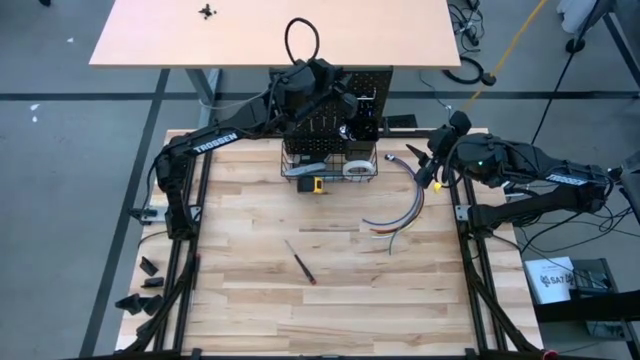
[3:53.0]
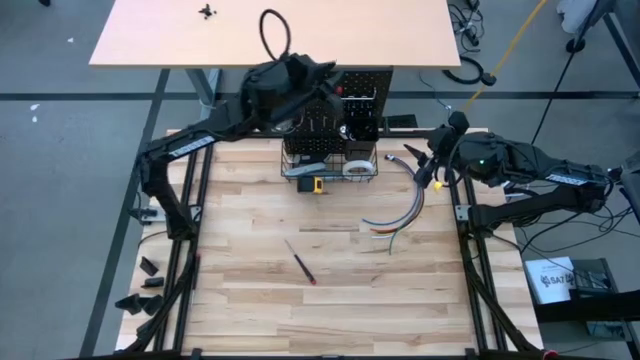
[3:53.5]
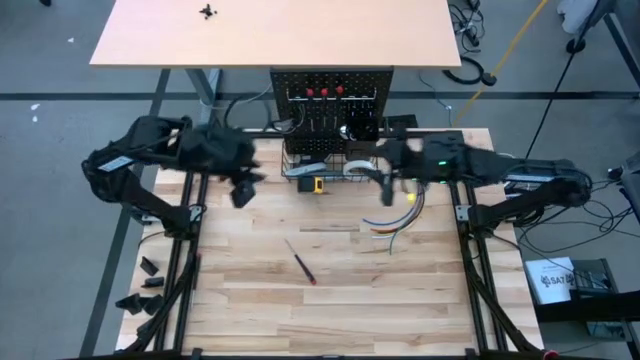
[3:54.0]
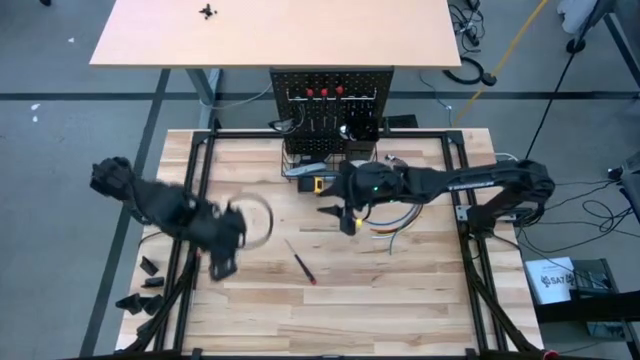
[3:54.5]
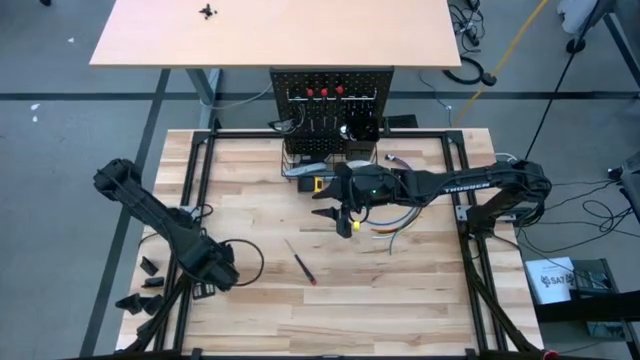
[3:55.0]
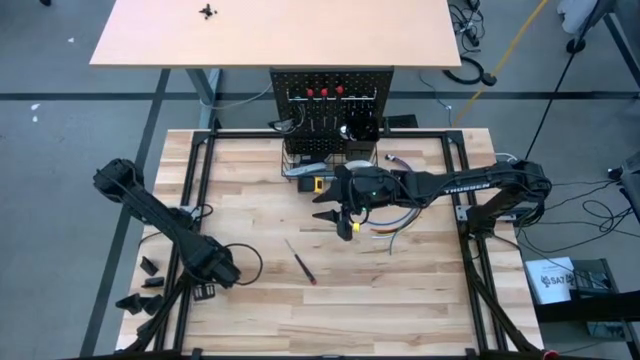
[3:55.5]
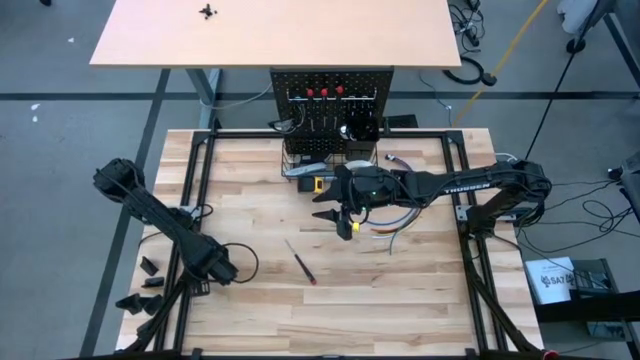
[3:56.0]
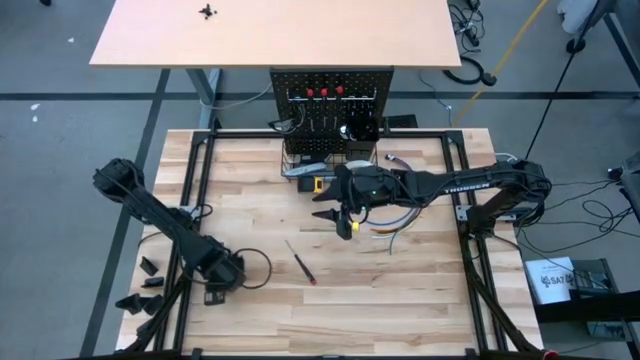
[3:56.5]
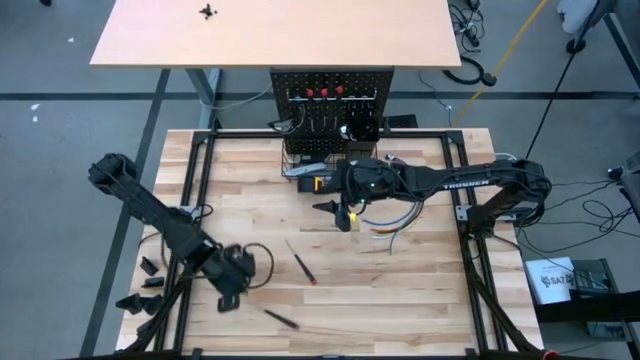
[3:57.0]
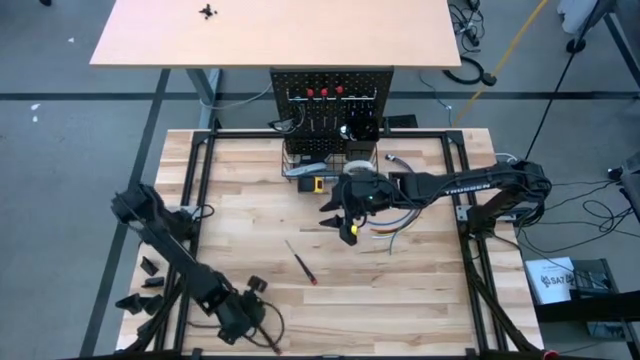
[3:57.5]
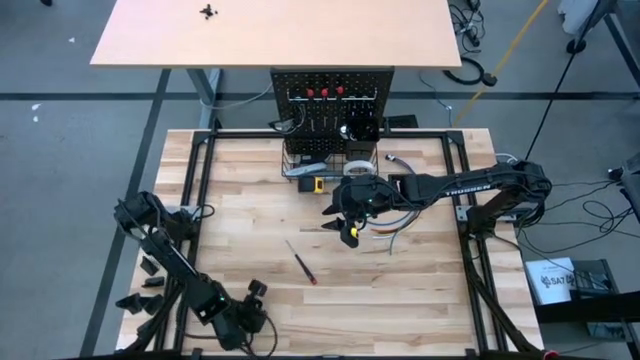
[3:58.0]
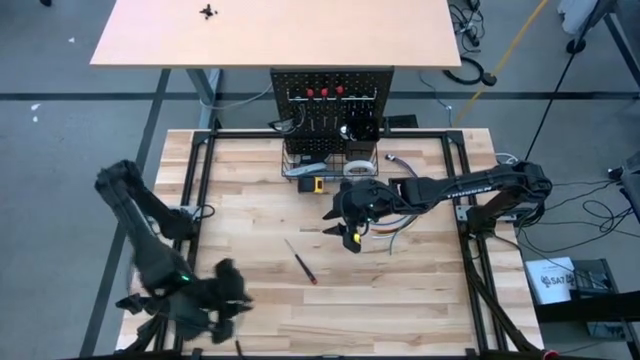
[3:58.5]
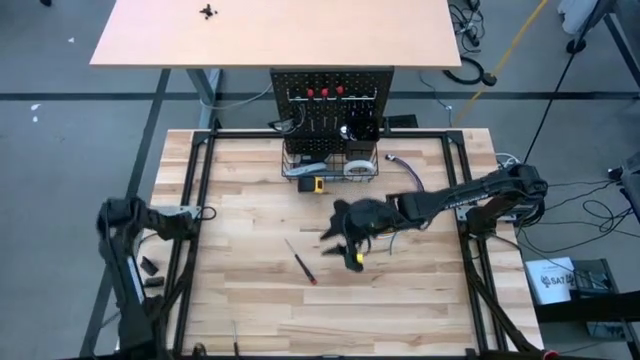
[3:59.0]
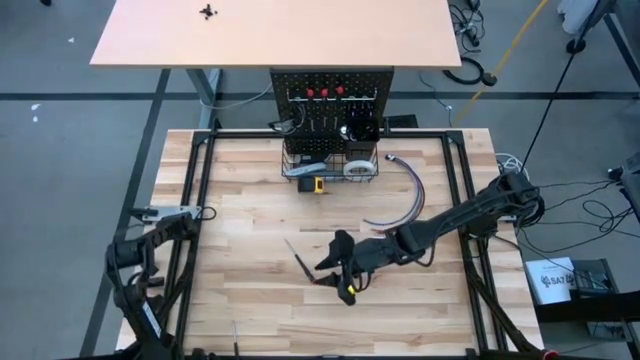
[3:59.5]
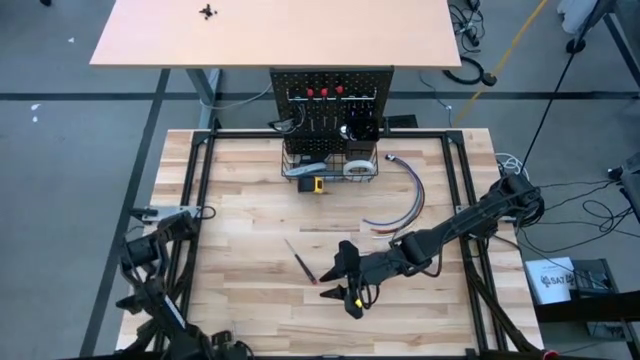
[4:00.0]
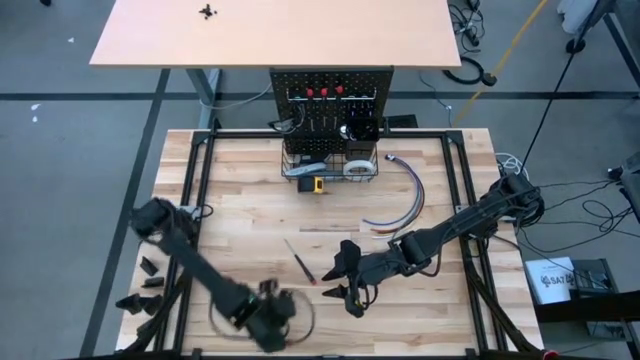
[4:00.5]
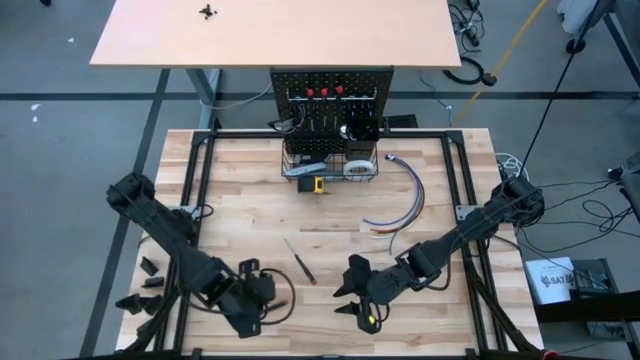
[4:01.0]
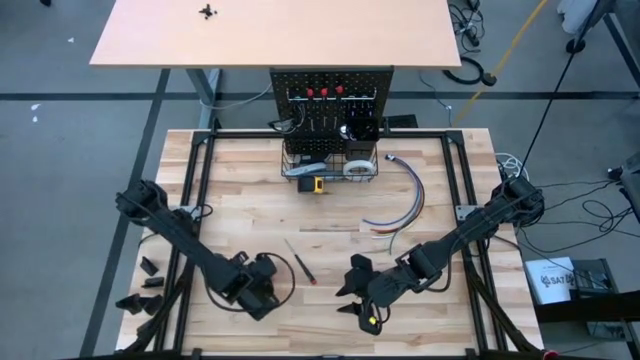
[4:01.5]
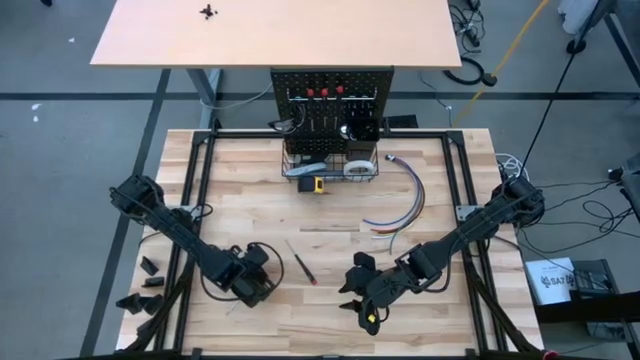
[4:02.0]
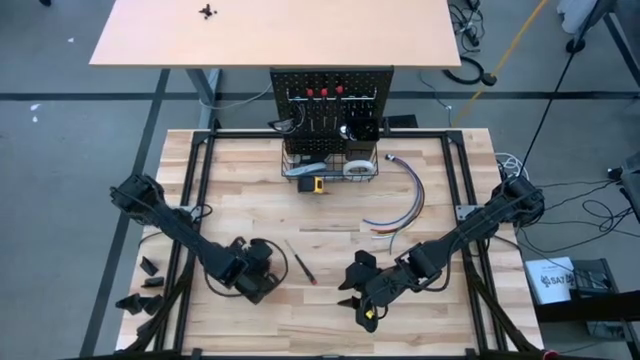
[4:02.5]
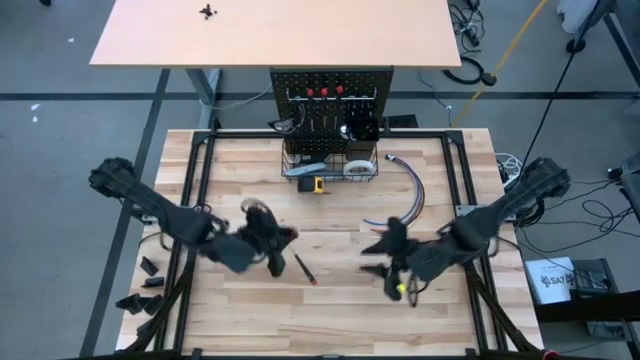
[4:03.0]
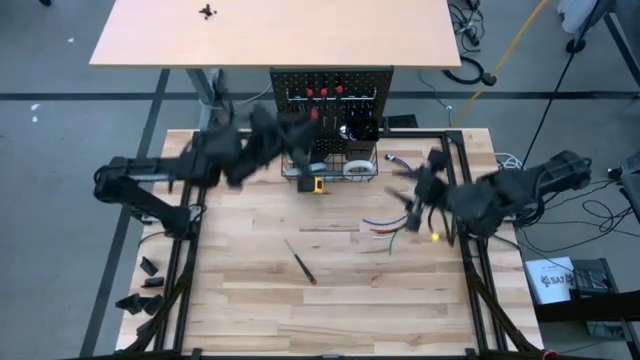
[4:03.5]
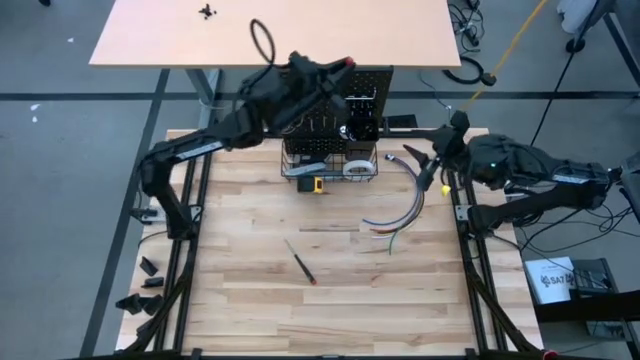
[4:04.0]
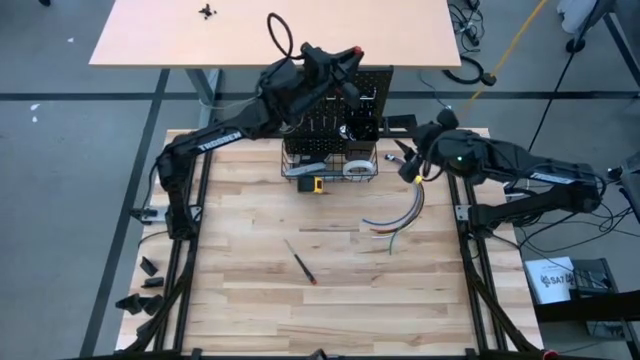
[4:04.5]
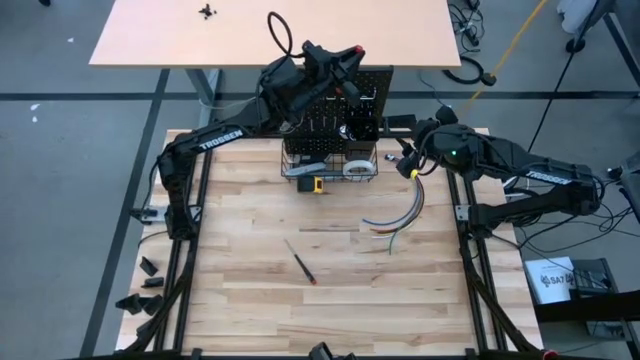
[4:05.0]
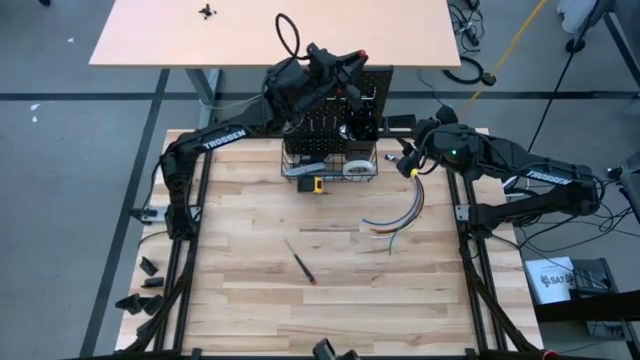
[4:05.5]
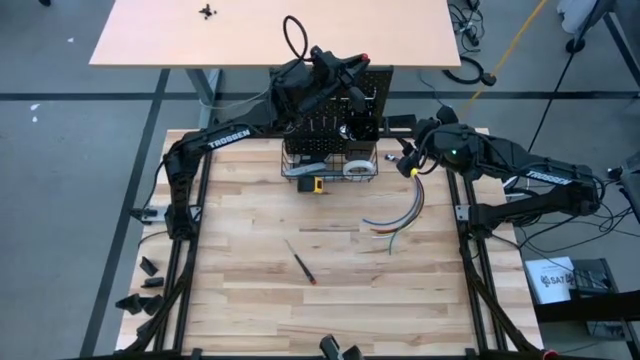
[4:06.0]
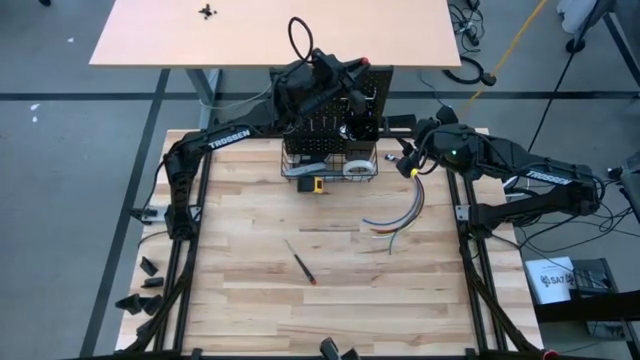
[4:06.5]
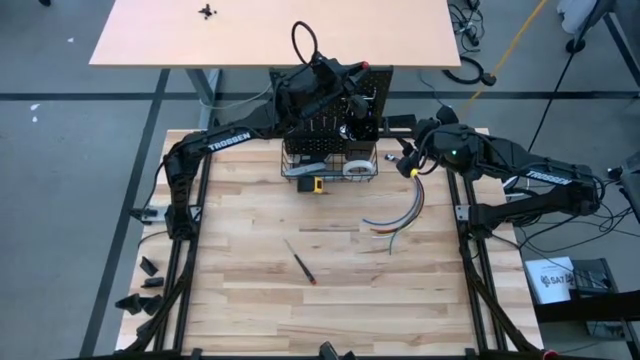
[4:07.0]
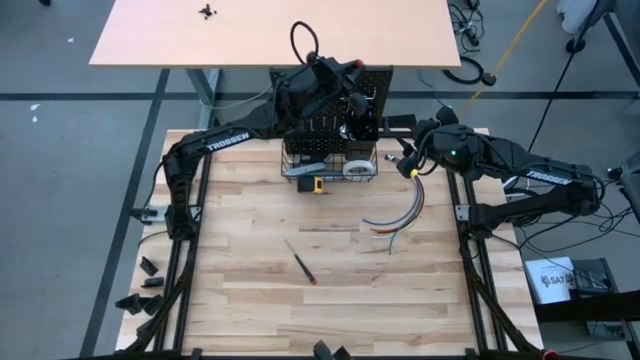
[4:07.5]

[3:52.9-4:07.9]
Task: Hang tools onto peg board
Hang the screwdriver on the pegboard

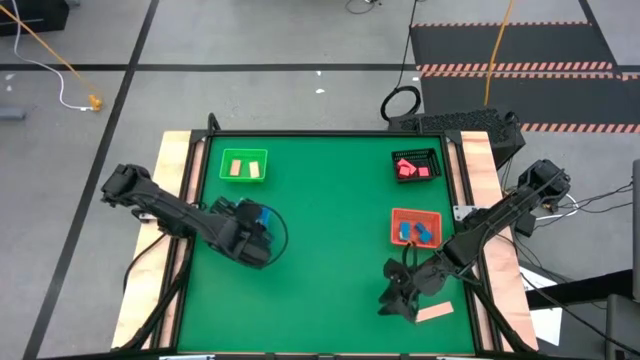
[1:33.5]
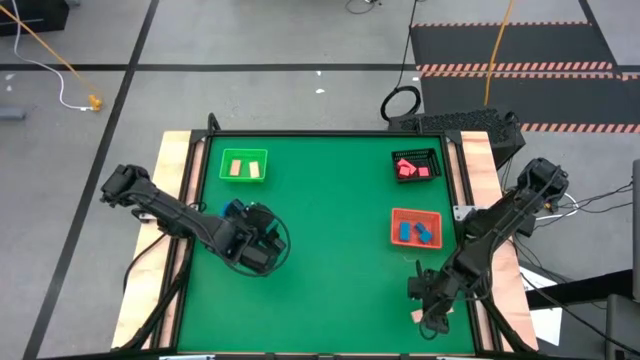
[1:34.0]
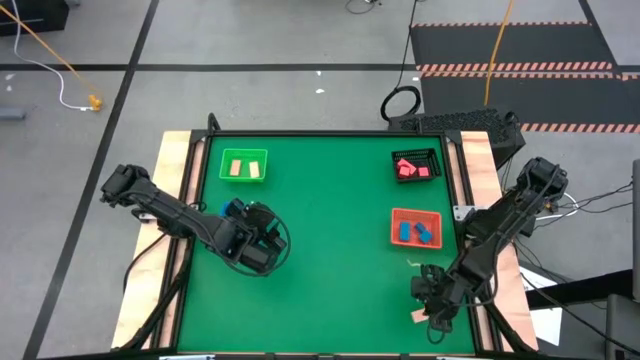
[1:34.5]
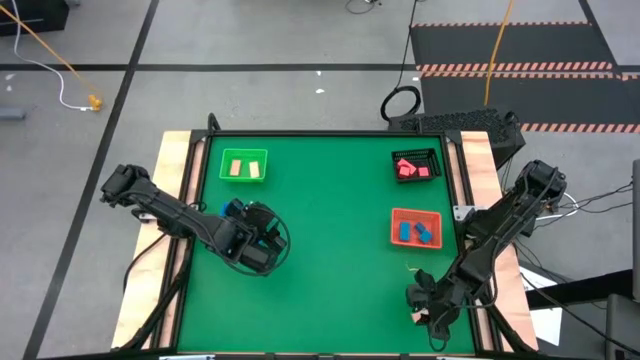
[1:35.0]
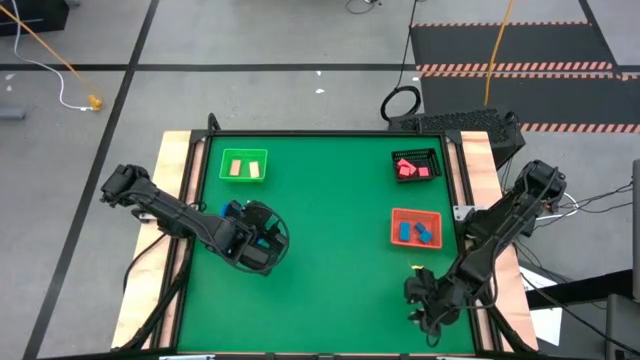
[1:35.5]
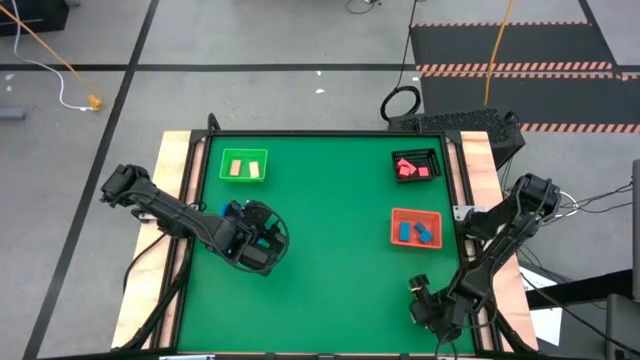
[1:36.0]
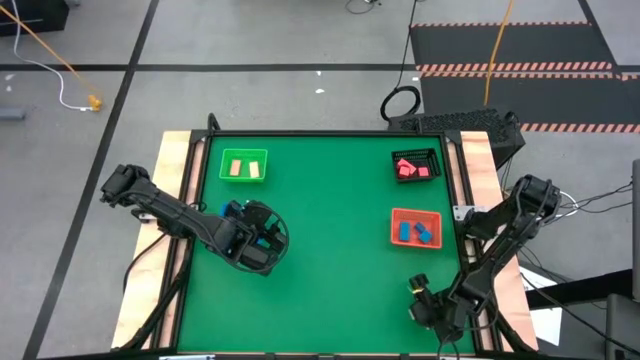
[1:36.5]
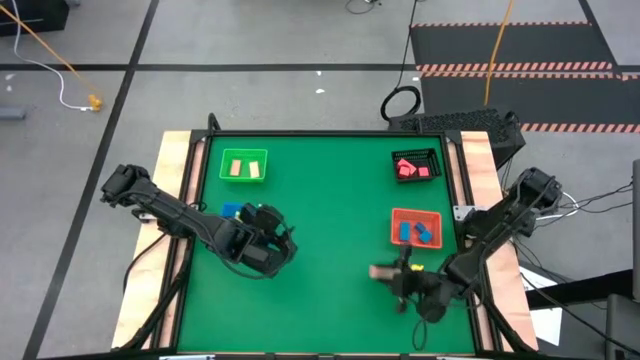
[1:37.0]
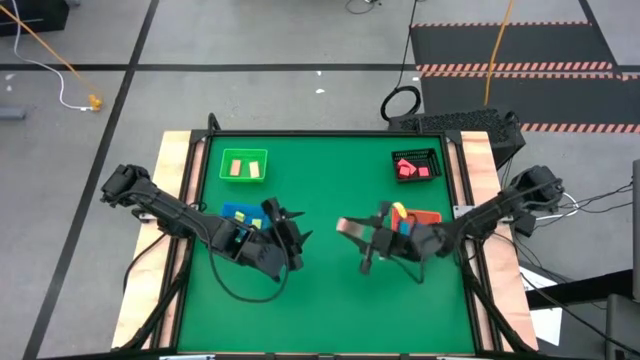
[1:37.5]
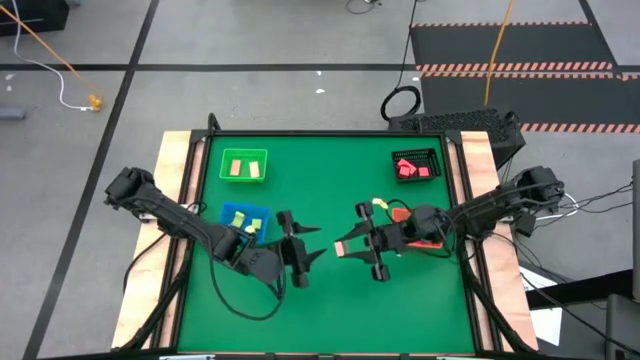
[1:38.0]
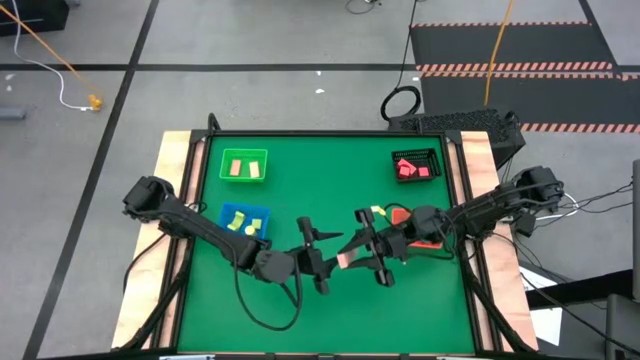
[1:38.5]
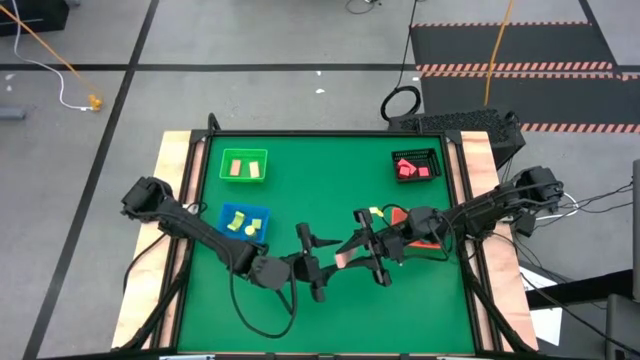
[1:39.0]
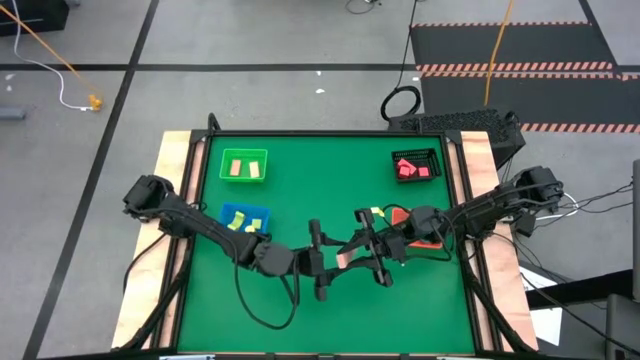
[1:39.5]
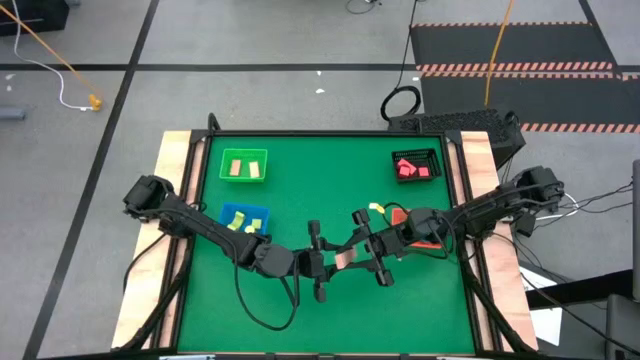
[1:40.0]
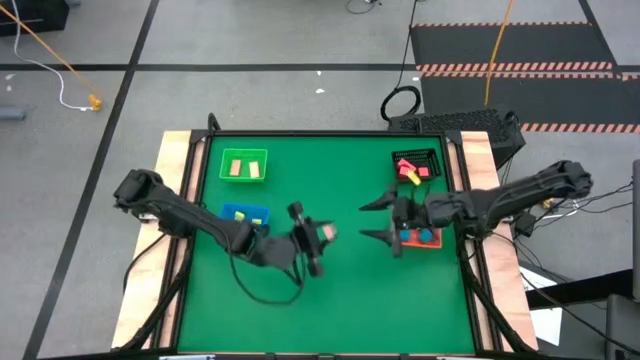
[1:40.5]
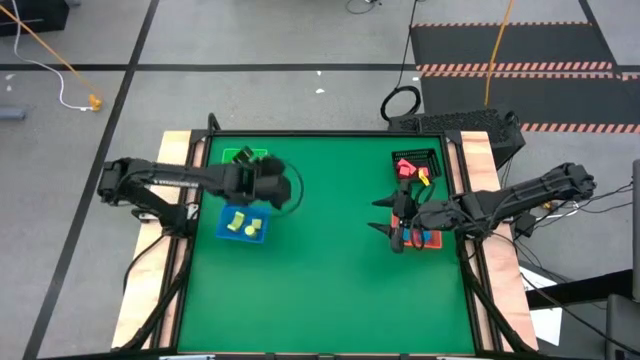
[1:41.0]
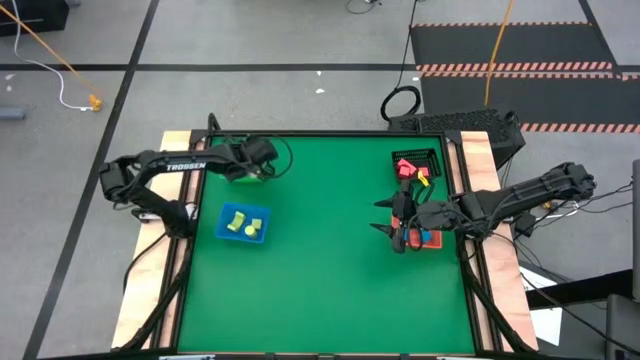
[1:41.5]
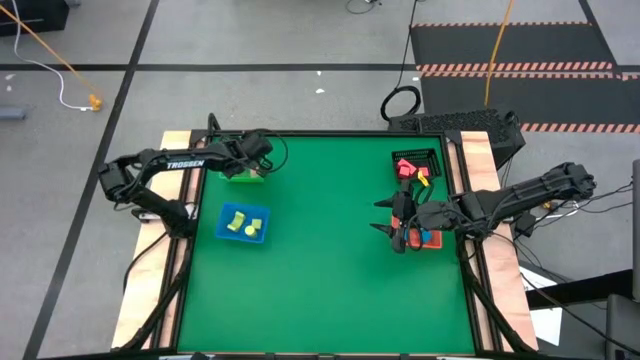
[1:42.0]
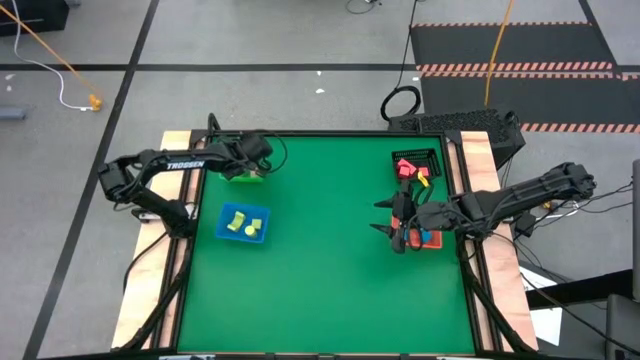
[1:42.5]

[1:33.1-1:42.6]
Task: Sort & place blocks by color
Put the brown block into the green bin
